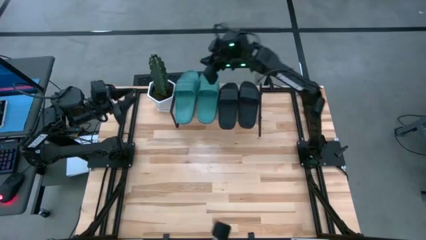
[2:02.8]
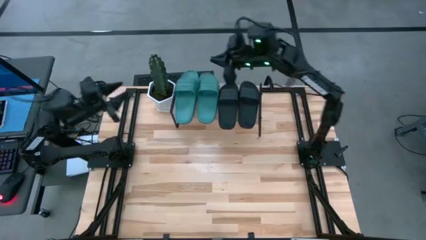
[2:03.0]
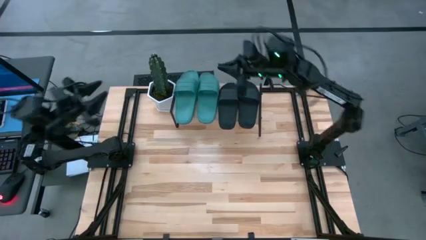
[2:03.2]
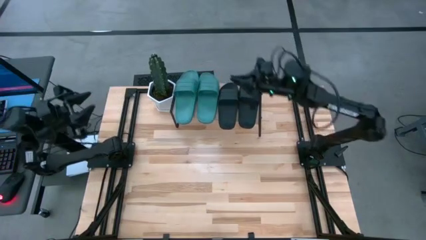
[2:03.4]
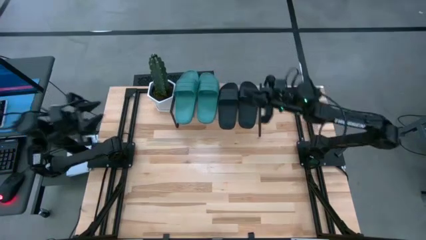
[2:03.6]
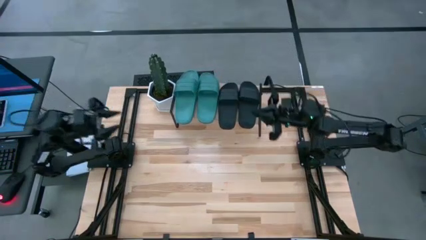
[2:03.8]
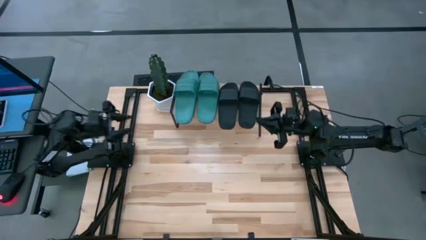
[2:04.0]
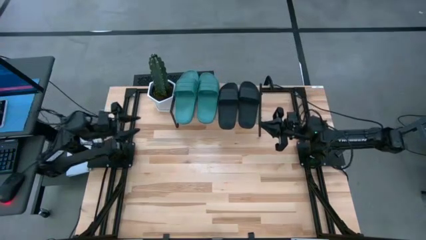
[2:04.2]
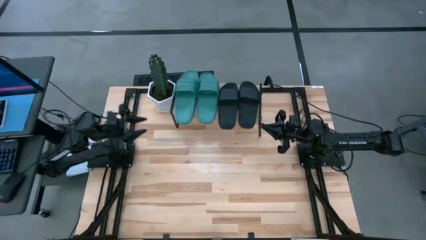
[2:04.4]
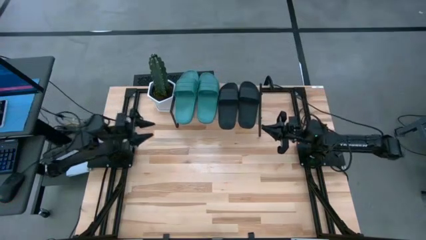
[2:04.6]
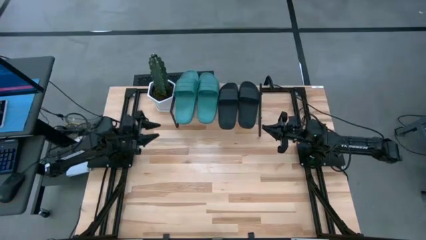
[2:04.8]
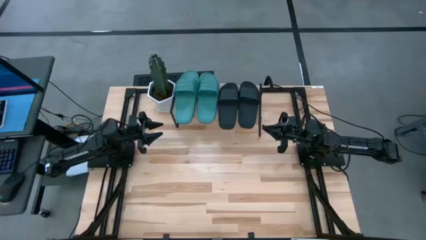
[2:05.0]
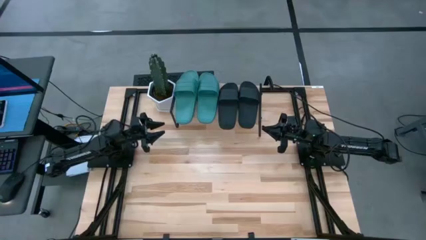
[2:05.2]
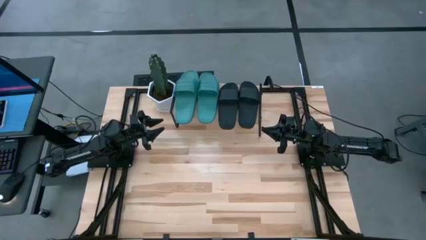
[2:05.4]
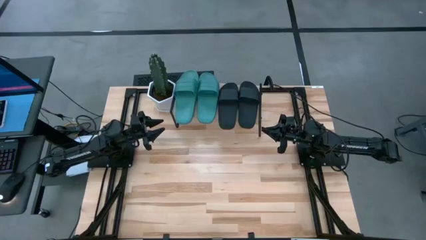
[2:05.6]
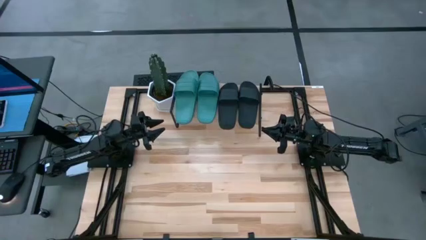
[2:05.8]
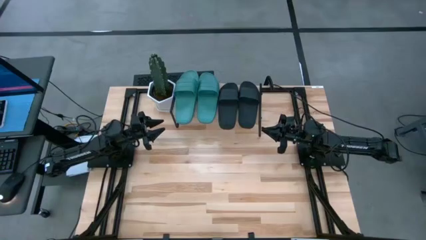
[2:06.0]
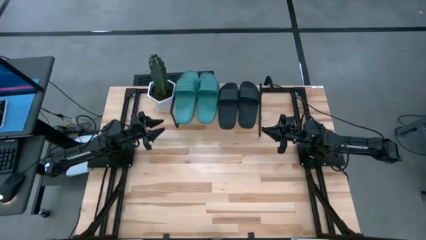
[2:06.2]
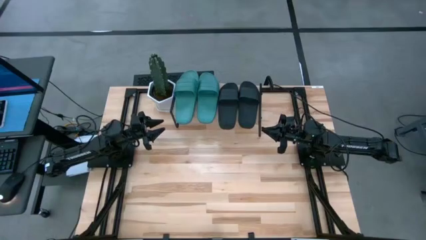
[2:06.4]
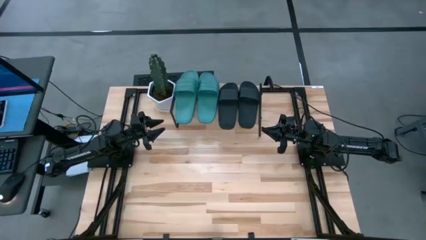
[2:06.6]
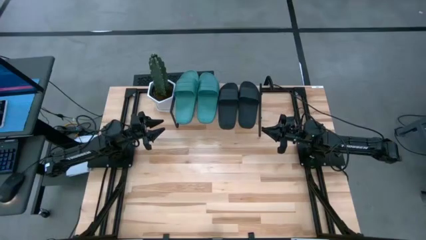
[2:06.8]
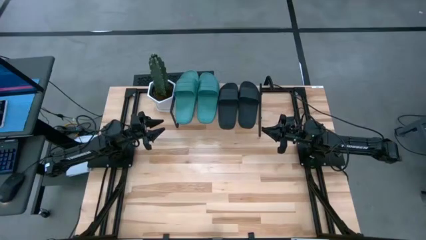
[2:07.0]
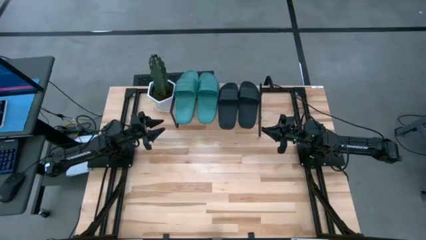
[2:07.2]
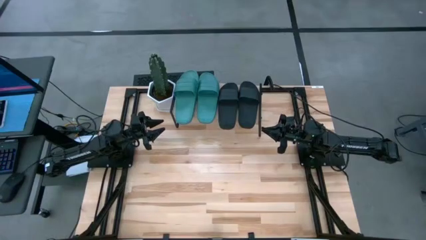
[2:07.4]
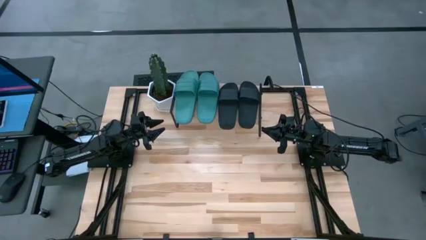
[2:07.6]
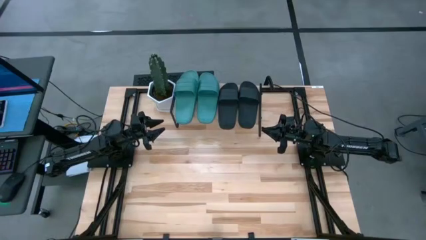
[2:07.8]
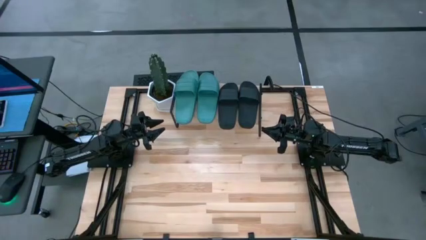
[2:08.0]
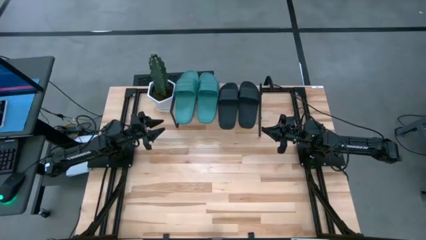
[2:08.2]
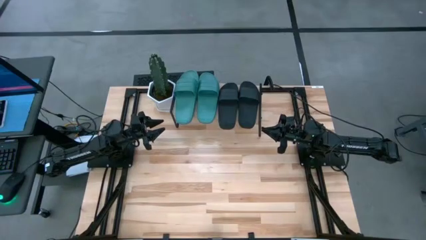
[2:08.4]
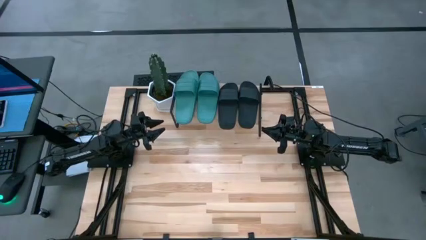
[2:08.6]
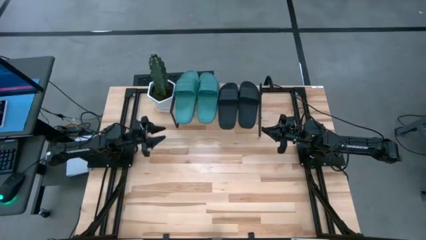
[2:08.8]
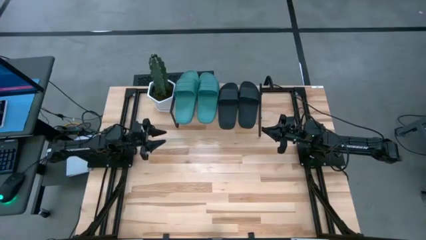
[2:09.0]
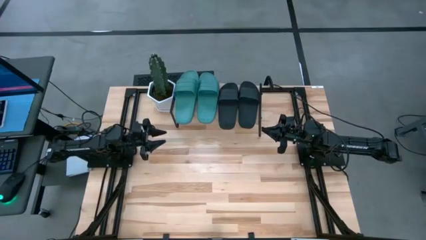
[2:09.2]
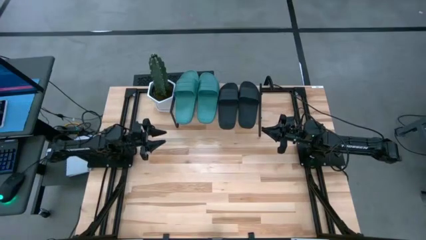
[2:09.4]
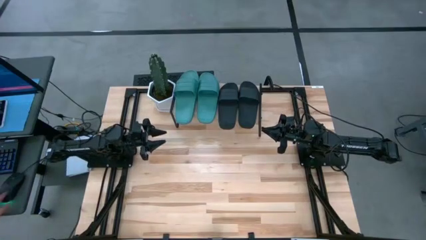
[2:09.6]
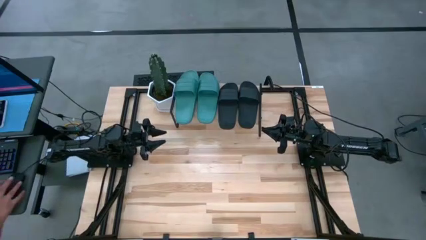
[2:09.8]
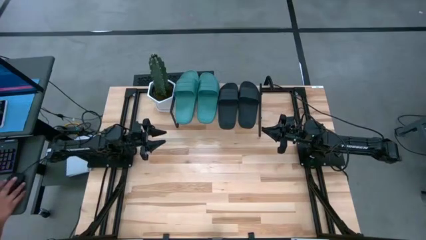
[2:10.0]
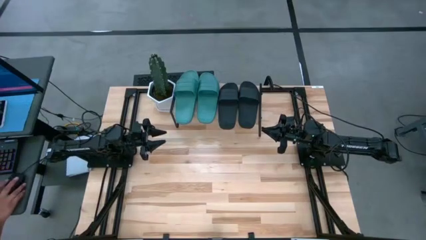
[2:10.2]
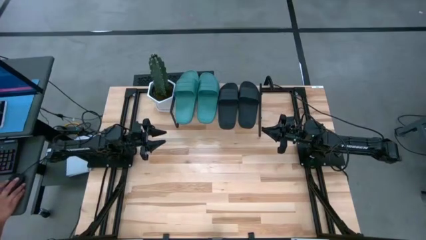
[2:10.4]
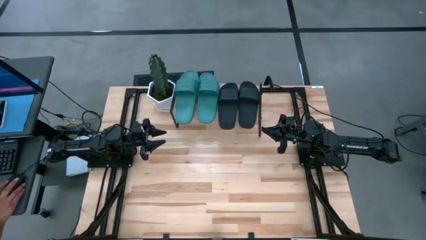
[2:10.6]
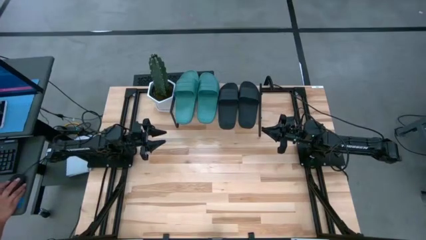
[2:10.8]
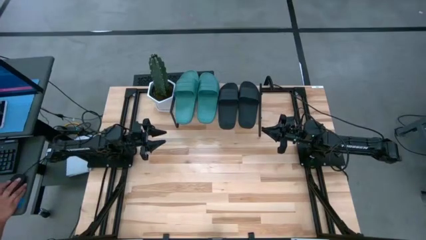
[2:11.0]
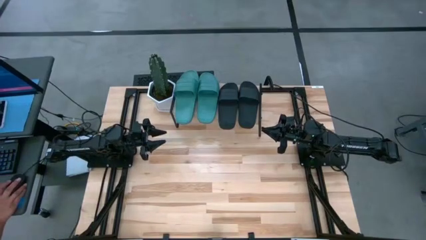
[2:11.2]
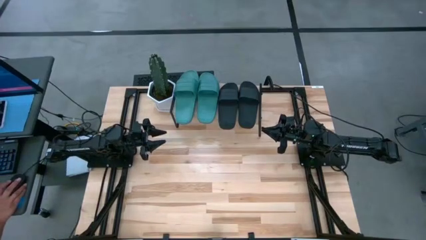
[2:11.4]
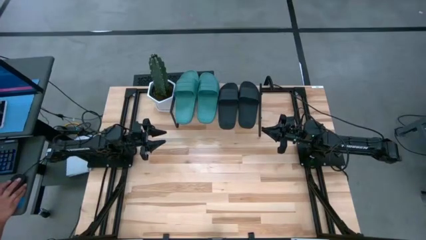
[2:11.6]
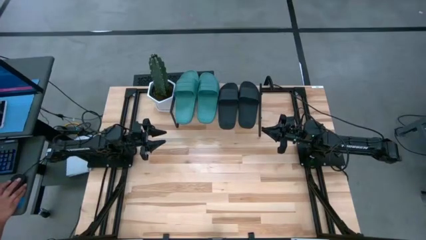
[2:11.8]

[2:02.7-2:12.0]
Task: Pick and place slides into the shelf
Return to Home Position

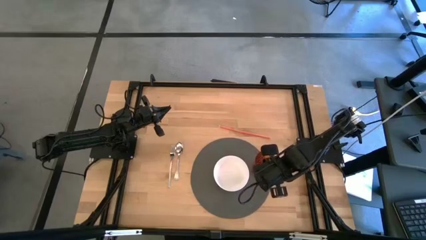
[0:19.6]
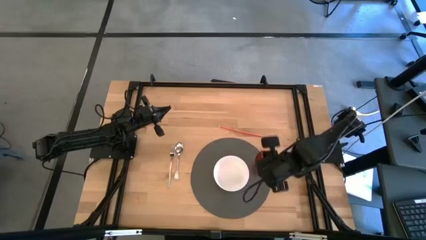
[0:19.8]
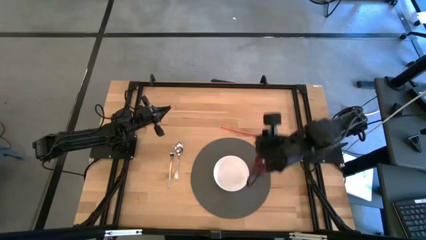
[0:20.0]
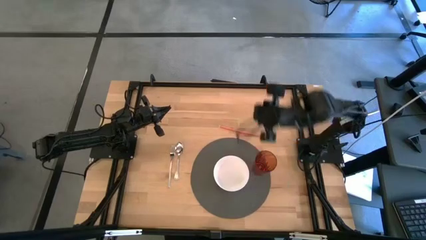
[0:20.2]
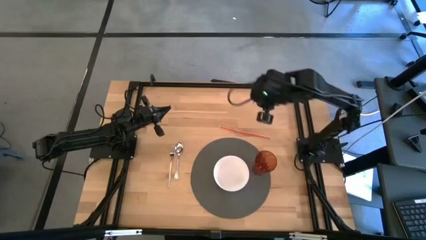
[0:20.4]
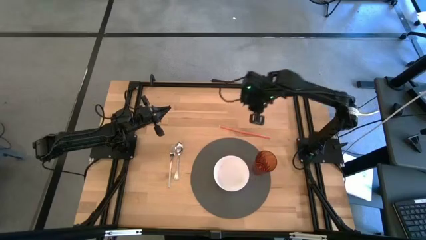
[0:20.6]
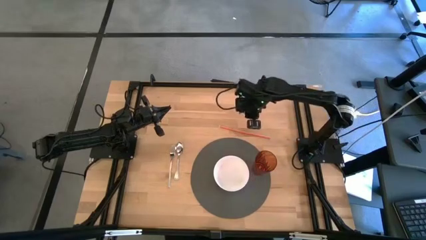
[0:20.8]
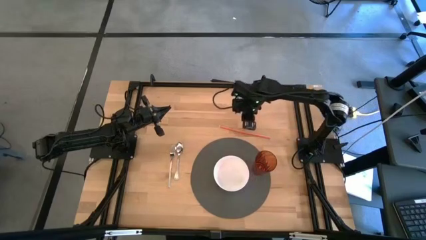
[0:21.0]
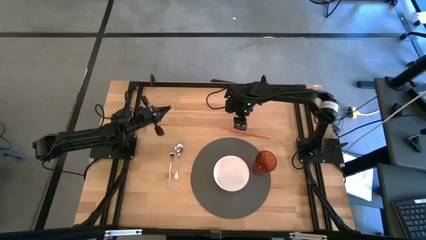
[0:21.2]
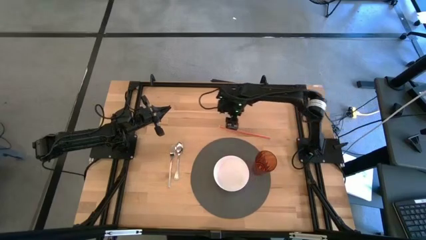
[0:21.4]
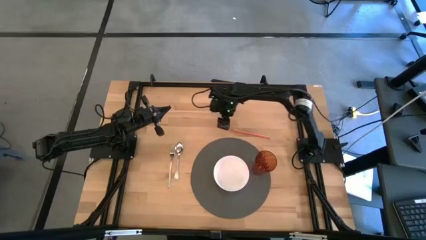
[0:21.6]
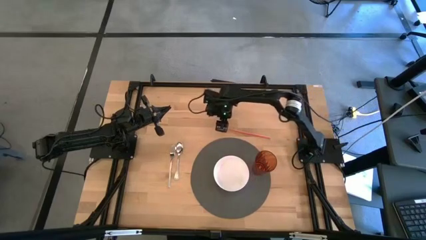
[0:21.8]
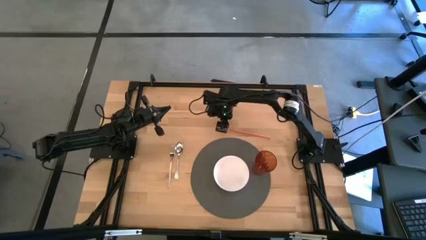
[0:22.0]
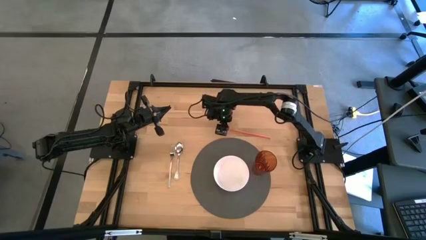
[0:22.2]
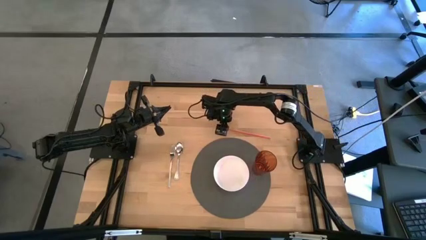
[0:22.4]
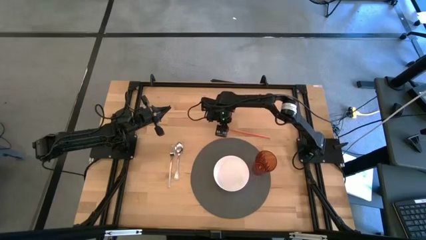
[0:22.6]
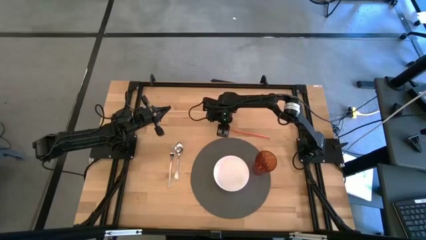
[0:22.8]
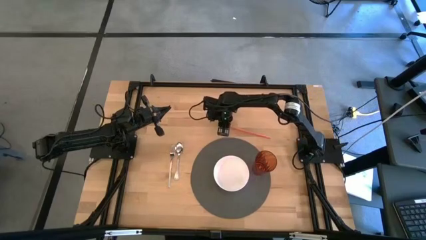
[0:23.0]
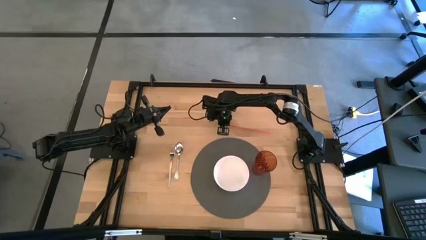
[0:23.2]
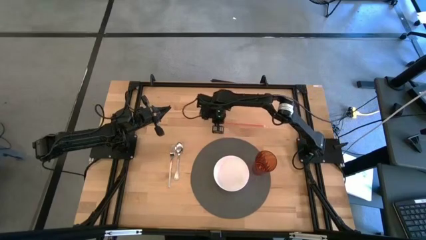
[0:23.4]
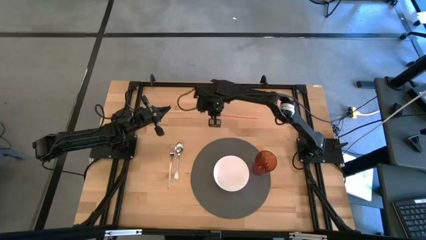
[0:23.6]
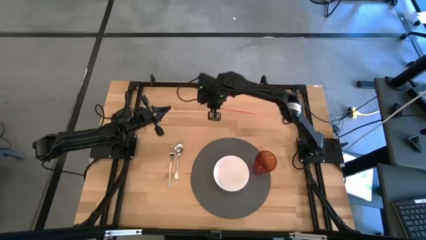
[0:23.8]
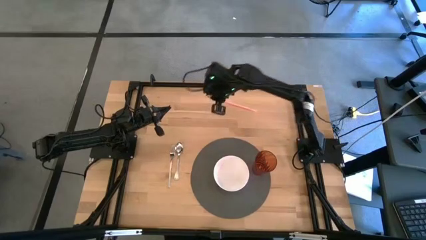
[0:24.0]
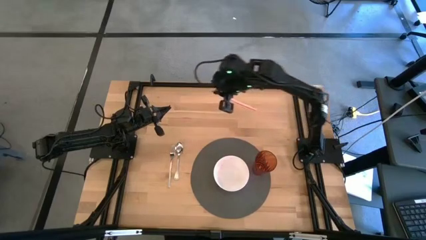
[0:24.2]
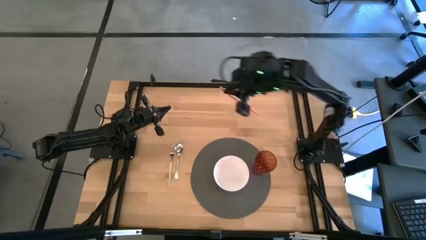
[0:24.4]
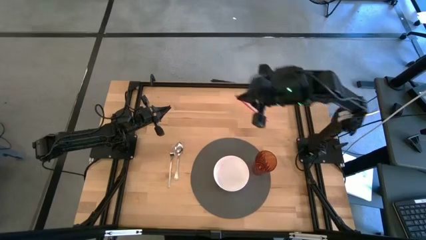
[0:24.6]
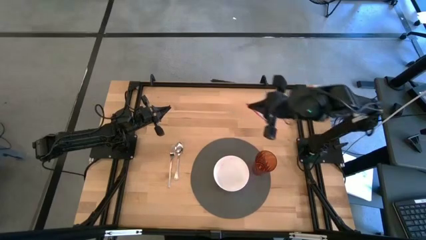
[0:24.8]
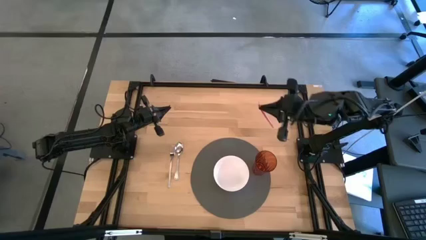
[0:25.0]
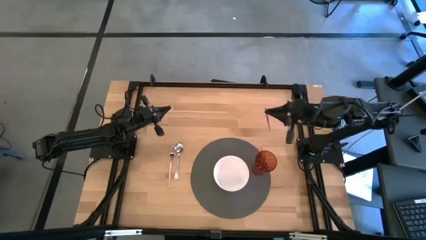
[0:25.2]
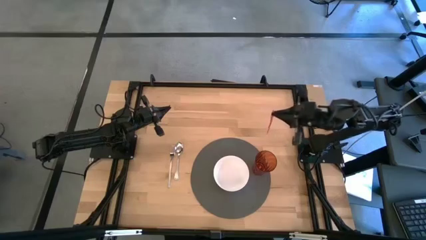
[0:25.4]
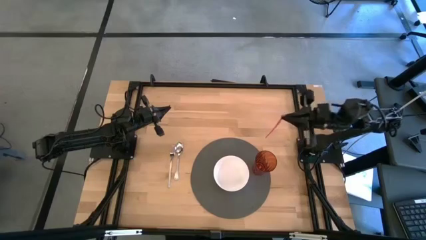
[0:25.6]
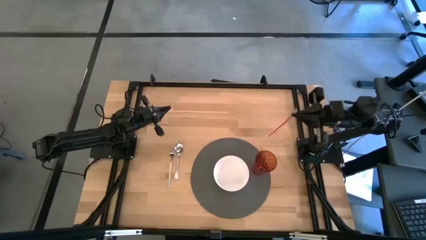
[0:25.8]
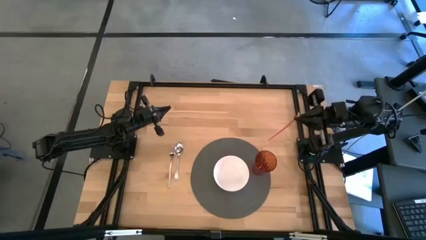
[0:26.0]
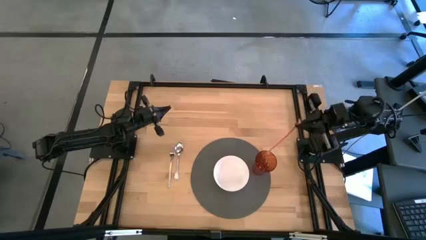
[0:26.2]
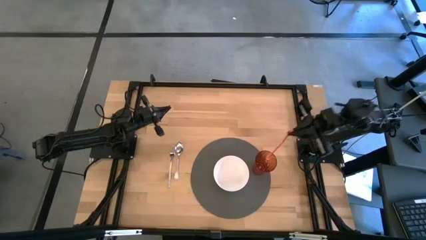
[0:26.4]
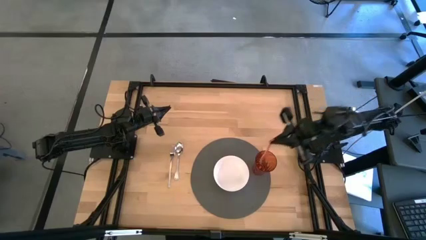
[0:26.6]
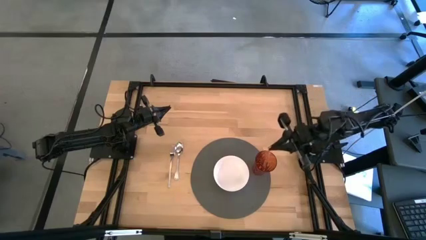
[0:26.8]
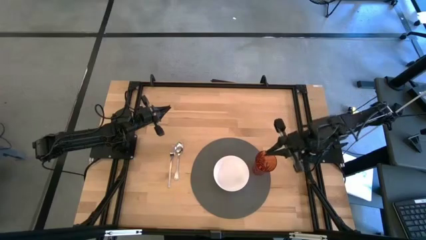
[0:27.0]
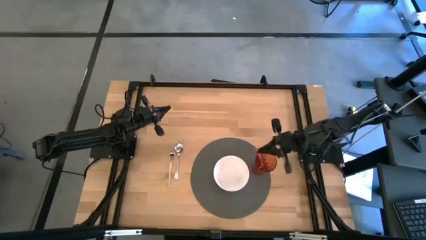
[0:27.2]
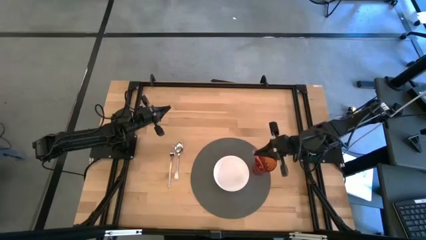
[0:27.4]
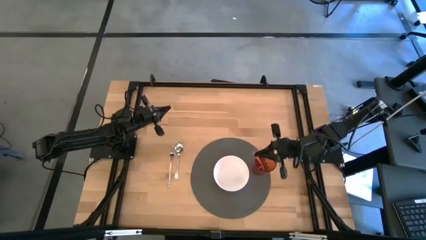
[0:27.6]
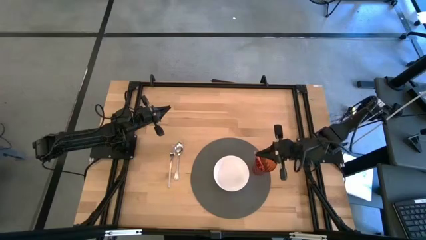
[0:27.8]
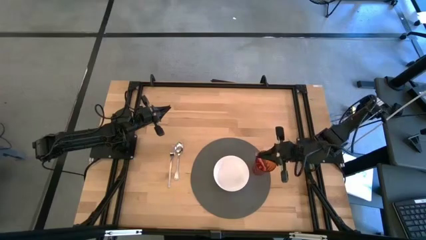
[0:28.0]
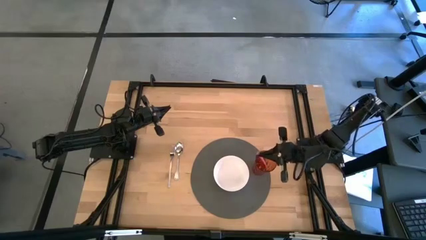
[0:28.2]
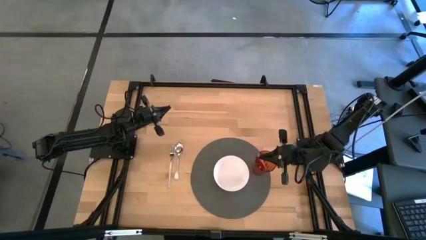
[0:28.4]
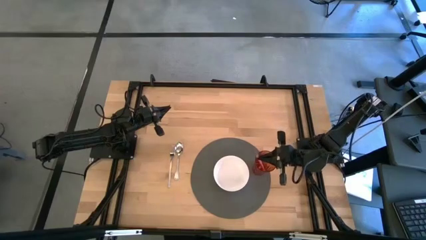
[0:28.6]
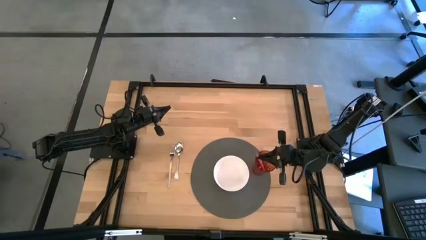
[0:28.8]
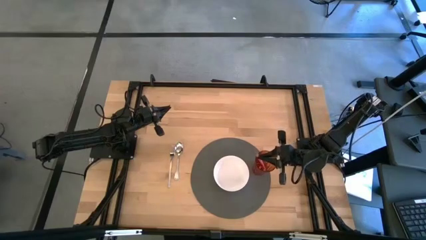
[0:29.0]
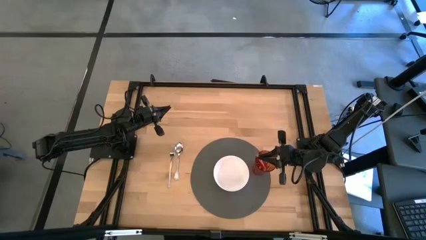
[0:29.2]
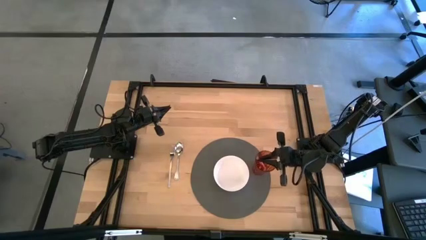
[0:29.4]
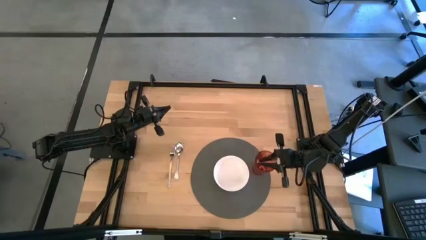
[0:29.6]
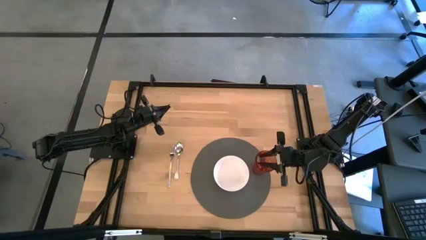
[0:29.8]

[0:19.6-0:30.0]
Task: Pick & Place Utensil
Put the orange straw into the orange cup
